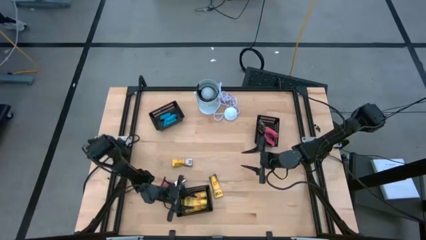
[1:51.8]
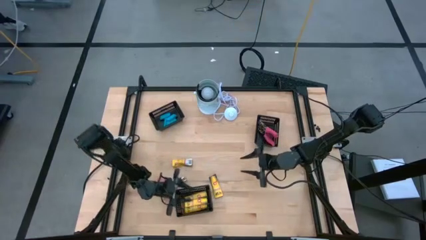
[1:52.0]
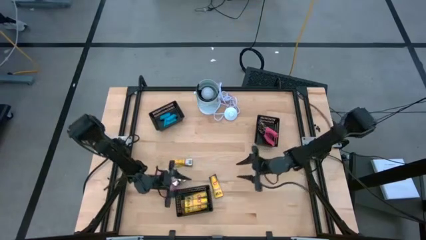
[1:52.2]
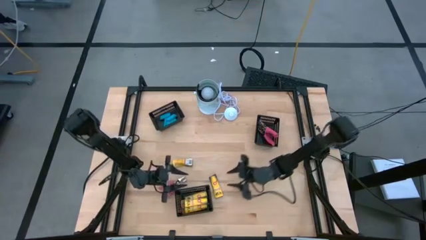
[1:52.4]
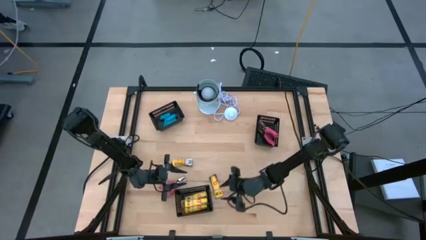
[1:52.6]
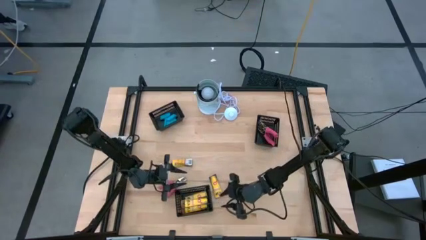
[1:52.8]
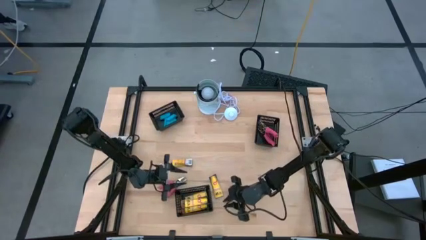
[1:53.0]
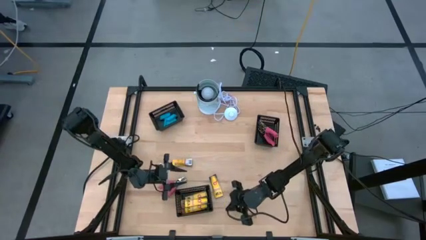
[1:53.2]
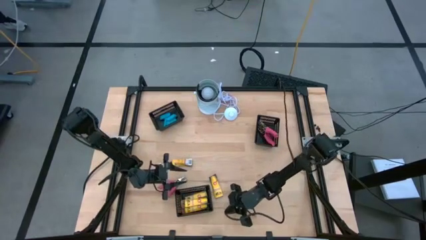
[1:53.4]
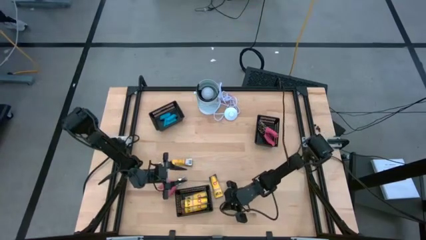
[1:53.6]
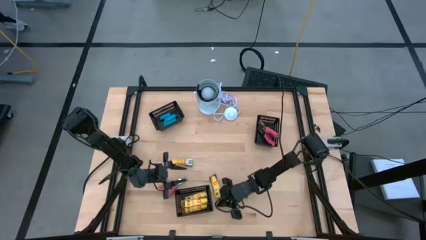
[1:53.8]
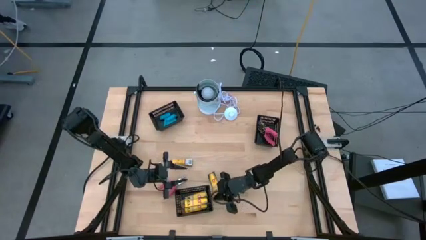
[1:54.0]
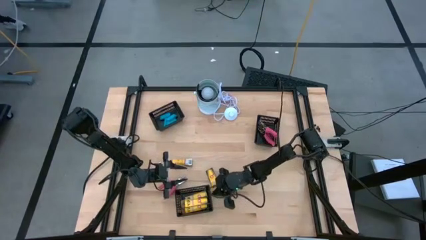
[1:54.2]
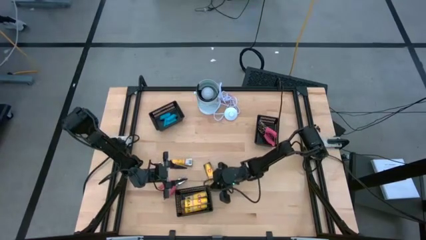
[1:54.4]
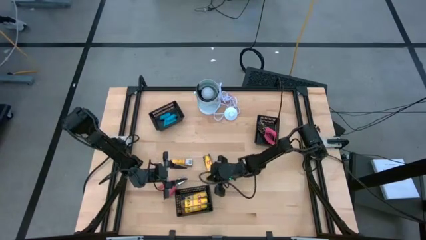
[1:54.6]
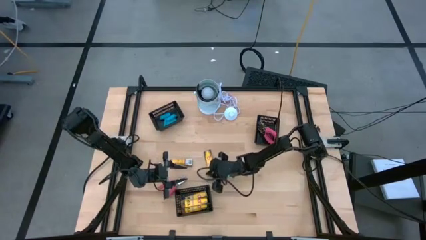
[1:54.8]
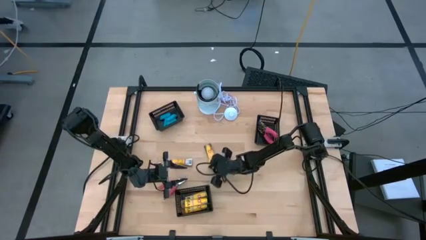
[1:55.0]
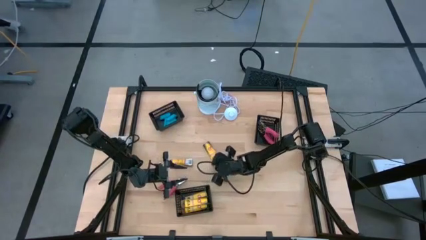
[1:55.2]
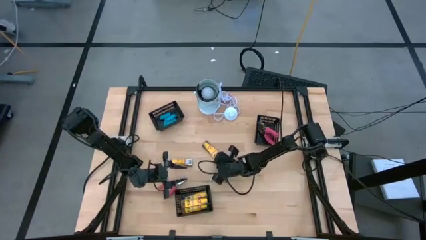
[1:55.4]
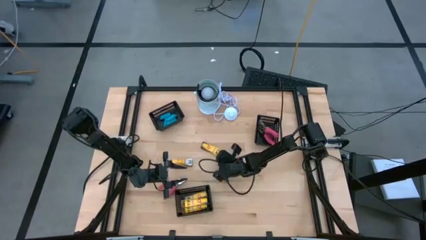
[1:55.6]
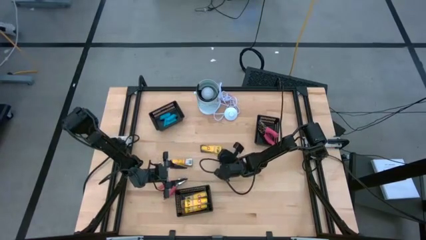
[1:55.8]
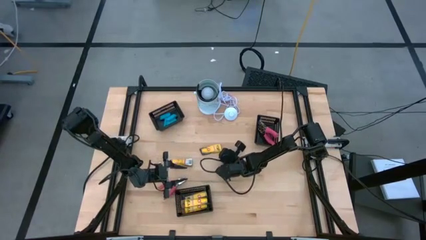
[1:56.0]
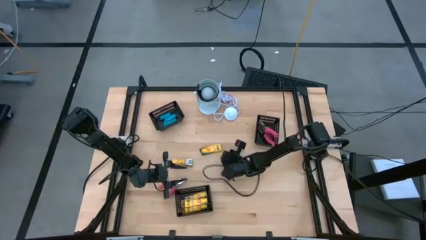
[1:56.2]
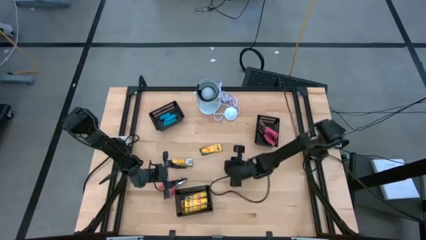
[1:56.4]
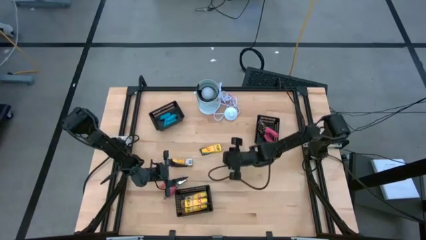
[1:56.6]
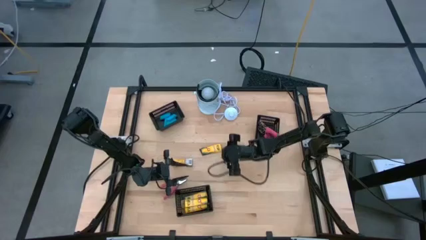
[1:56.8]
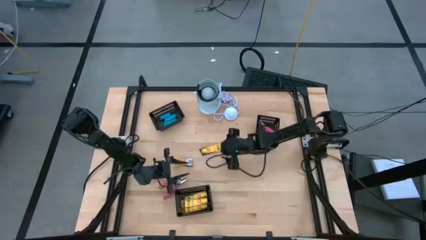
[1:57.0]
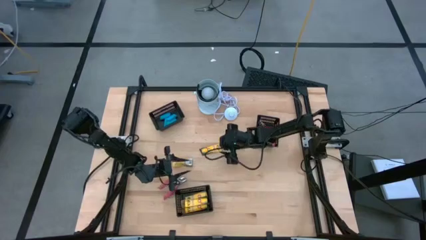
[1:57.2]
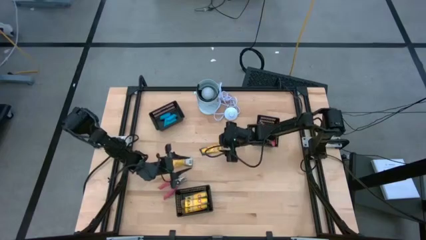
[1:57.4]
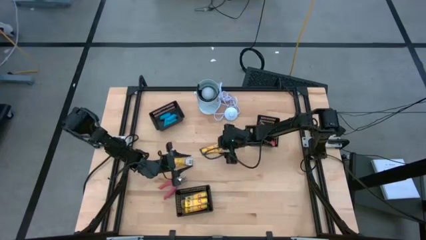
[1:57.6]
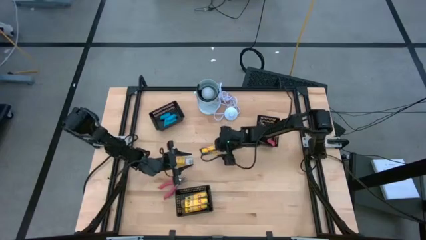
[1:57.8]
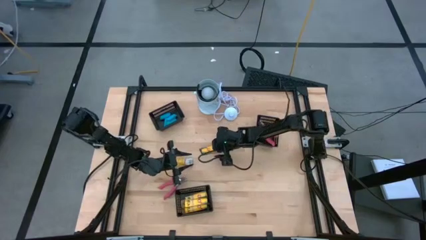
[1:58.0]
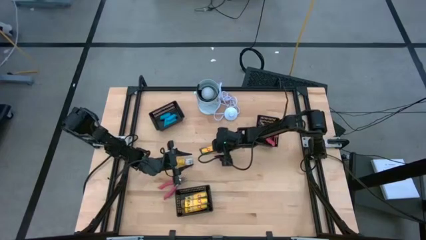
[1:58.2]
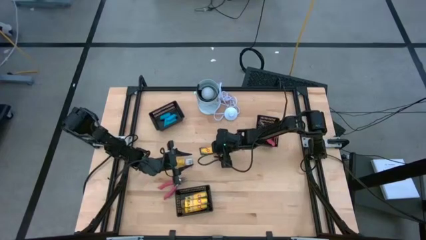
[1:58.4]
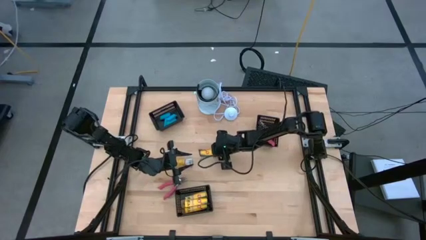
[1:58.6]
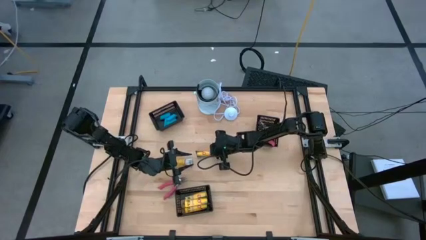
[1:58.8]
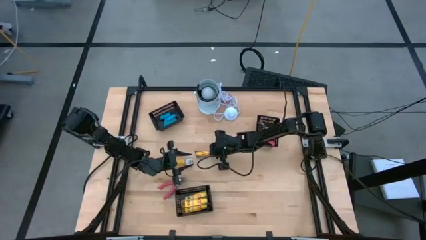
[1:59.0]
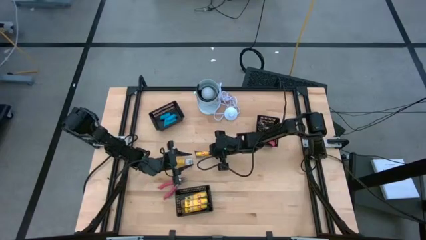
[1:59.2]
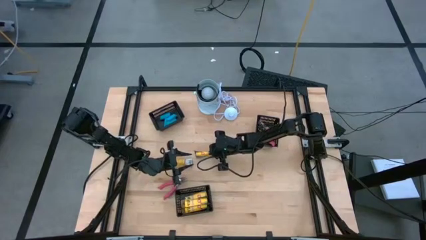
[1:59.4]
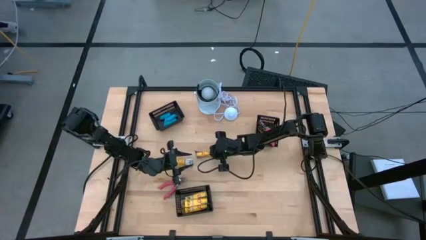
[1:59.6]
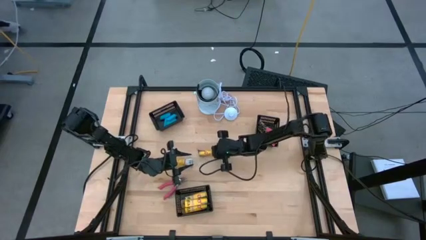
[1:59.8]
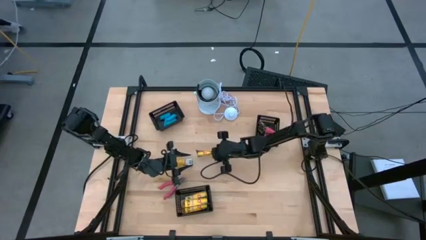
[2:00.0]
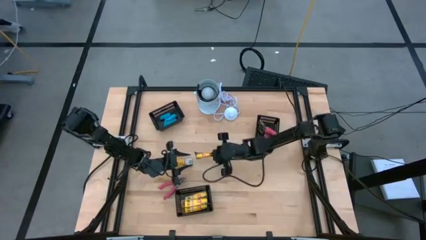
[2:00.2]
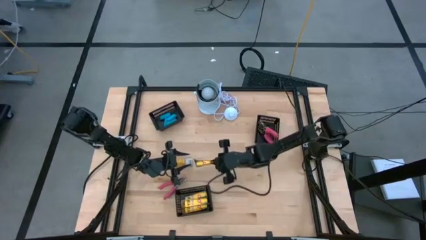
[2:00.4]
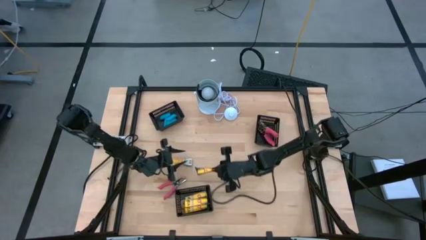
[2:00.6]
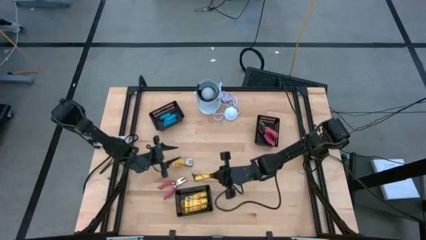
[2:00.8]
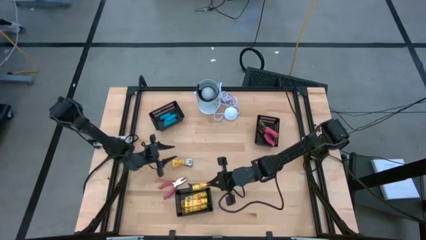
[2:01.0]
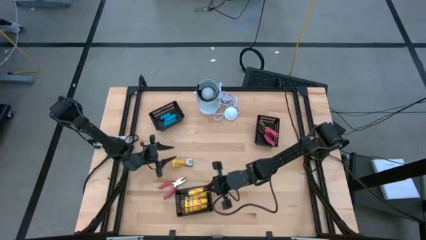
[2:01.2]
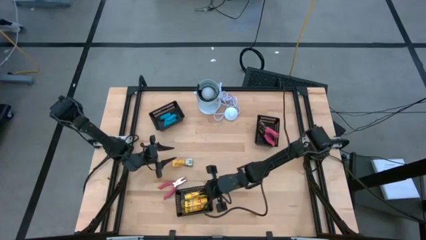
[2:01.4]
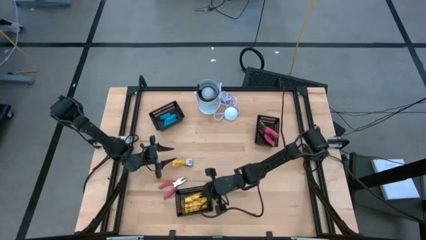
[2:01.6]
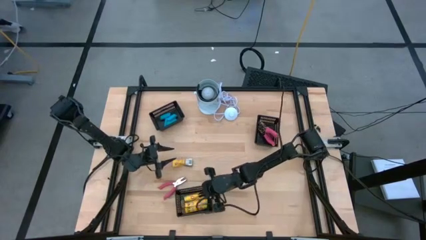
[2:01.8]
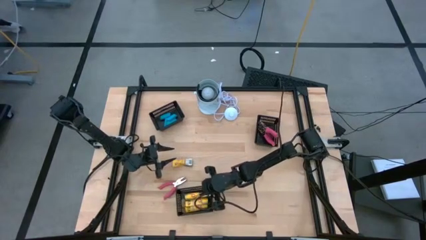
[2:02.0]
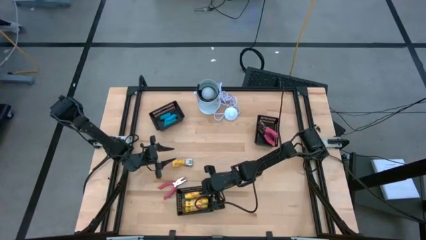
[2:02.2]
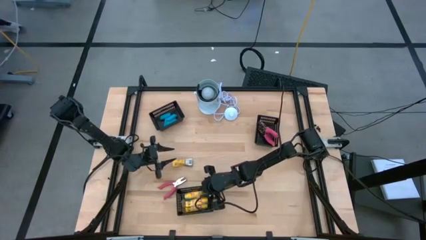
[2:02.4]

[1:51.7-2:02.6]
Task: Pick & Place School Supplies
Put the yellow crayon box into the bottom black bin

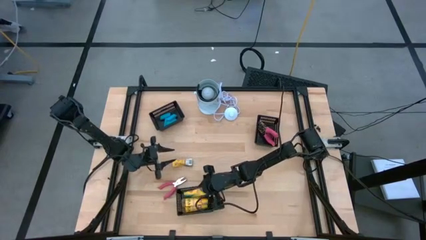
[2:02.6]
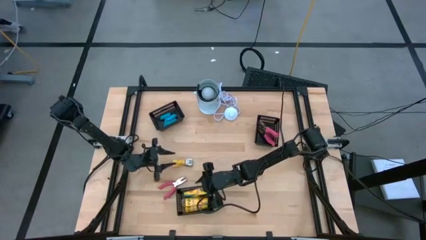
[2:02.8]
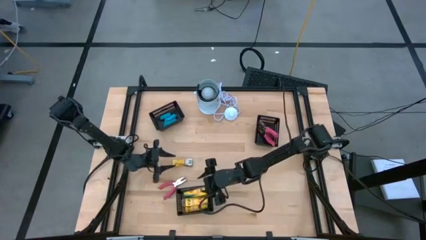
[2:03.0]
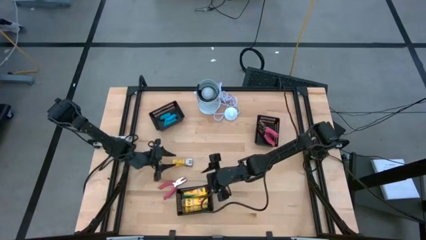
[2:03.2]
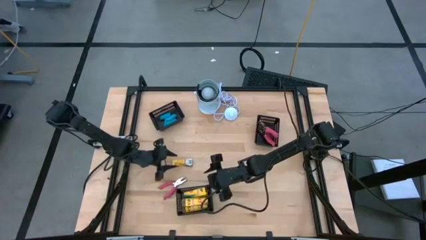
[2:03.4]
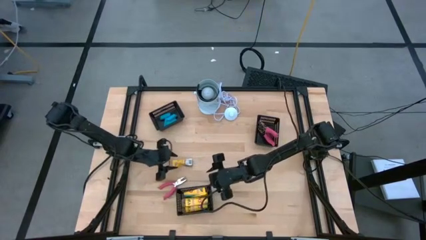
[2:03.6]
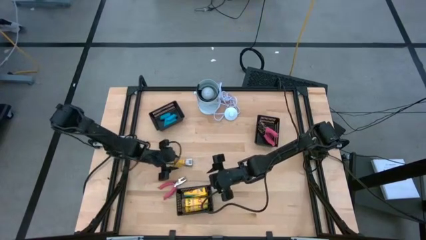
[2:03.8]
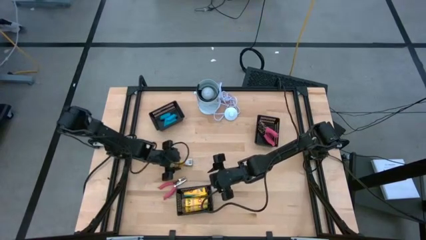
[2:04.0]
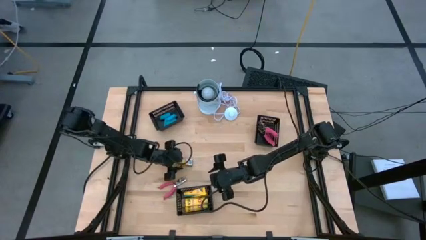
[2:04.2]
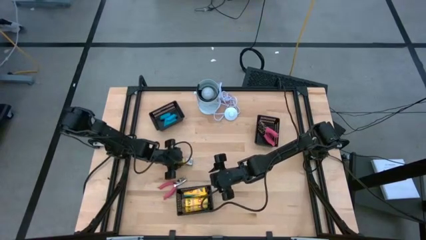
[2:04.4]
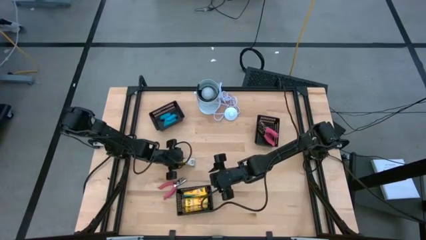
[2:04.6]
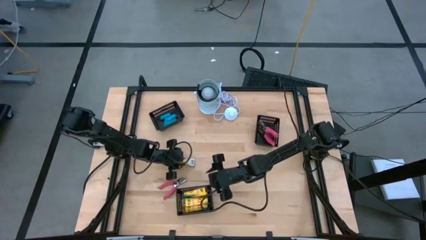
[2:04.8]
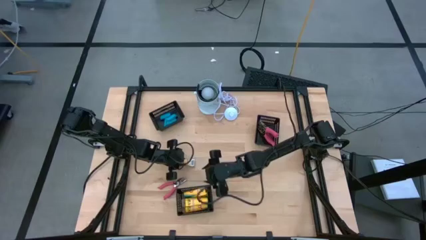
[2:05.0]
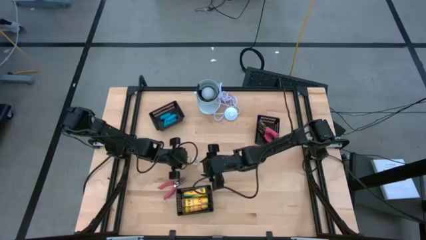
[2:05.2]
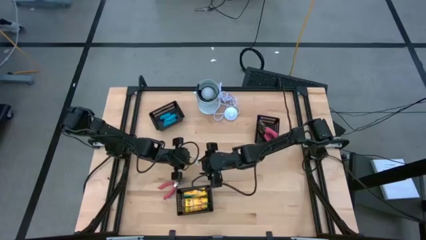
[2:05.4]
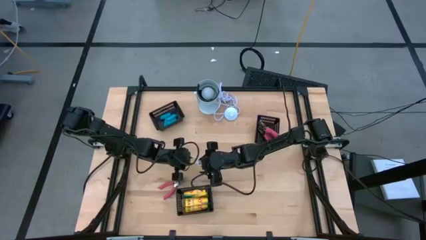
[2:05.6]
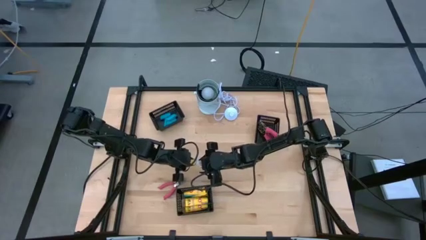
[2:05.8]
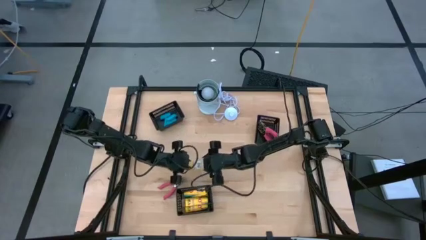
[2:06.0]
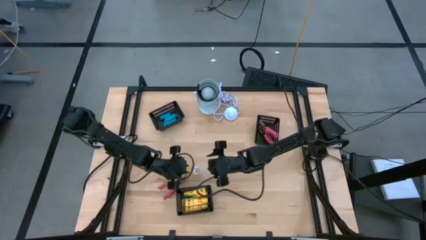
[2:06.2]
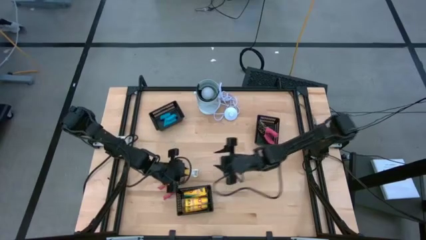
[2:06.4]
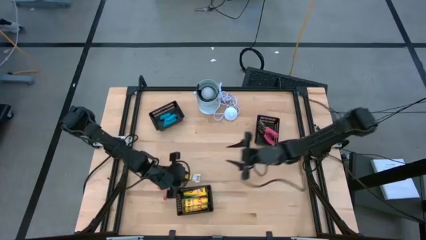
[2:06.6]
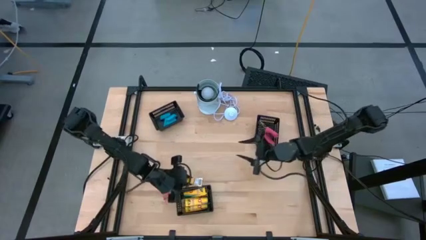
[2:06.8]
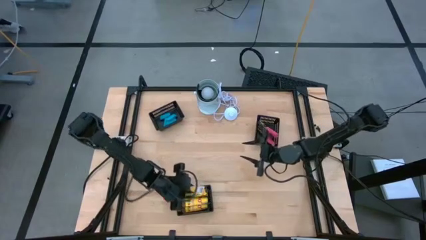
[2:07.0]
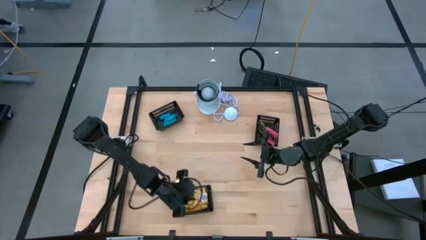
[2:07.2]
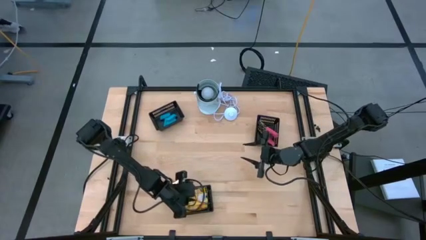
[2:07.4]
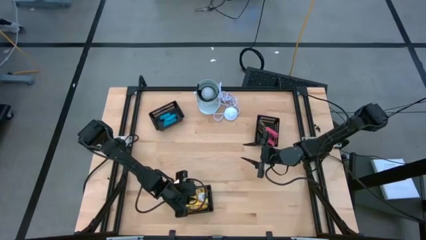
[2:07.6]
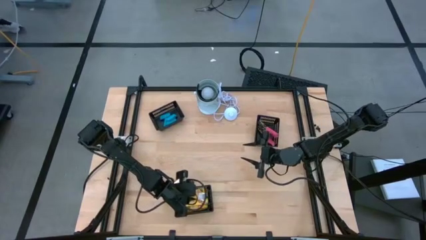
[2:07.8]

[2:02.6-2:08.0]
Put the yellow crayon box into the bottom black bin
